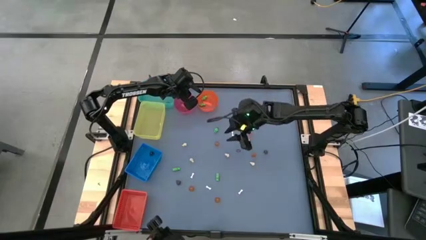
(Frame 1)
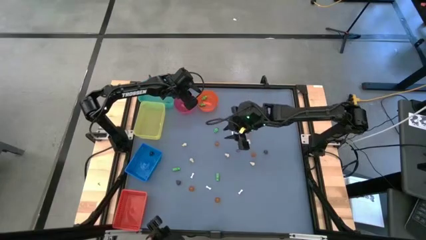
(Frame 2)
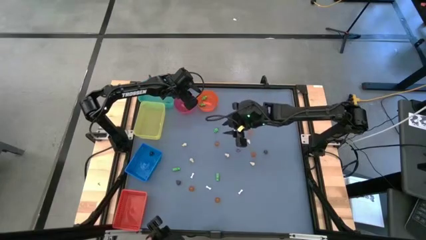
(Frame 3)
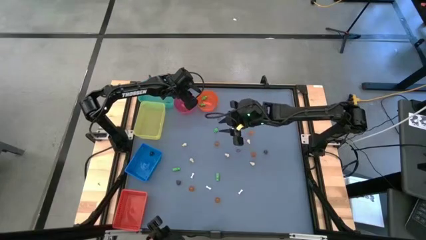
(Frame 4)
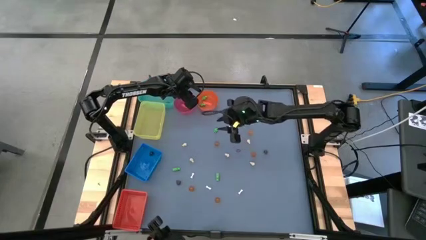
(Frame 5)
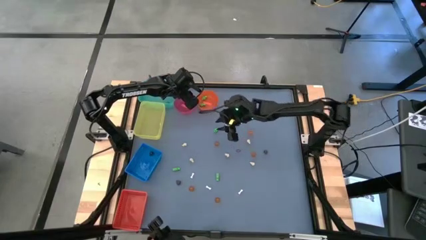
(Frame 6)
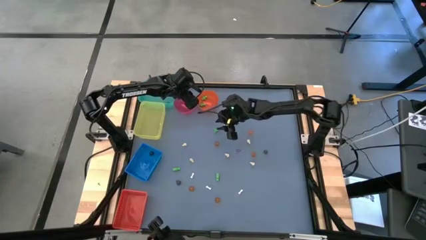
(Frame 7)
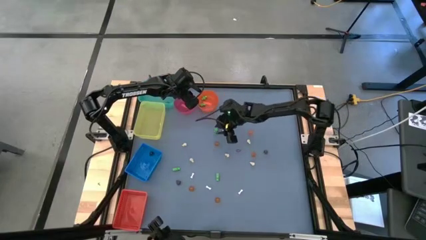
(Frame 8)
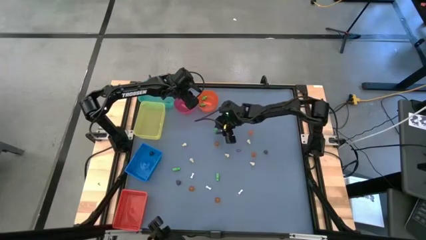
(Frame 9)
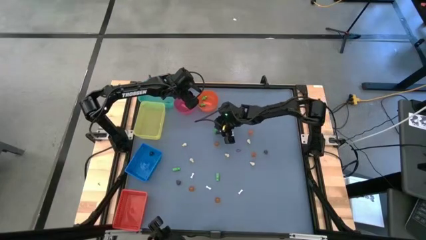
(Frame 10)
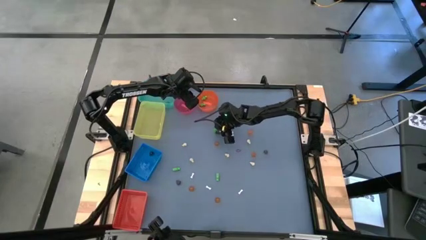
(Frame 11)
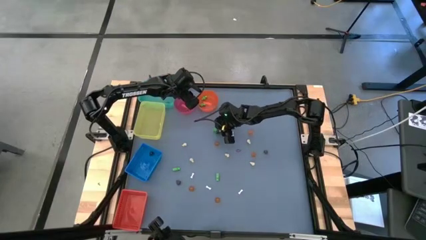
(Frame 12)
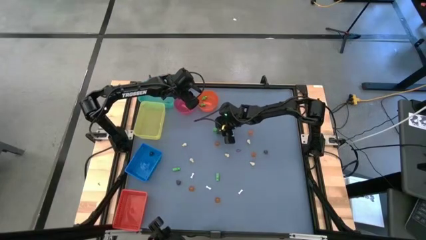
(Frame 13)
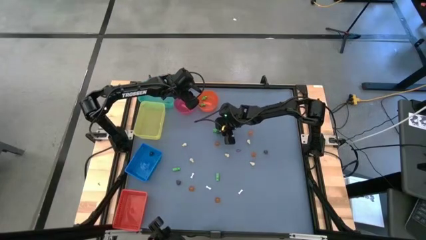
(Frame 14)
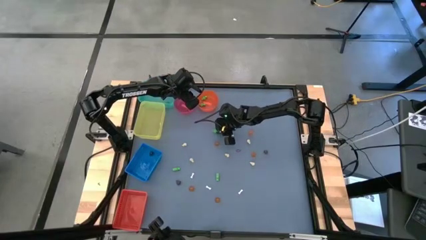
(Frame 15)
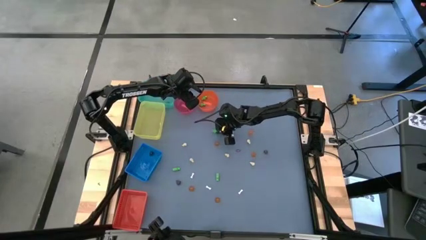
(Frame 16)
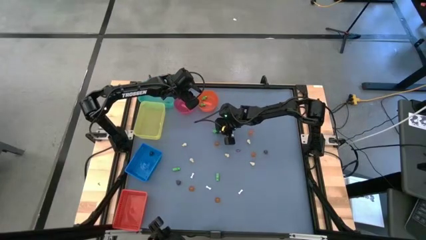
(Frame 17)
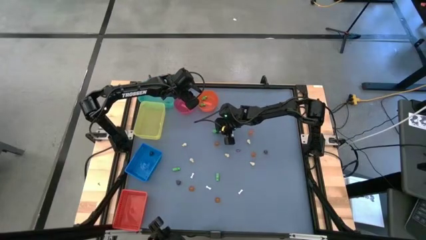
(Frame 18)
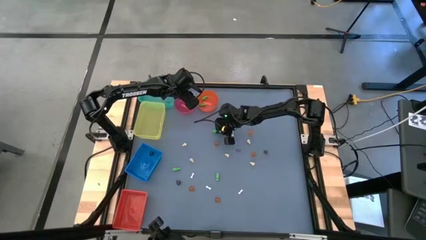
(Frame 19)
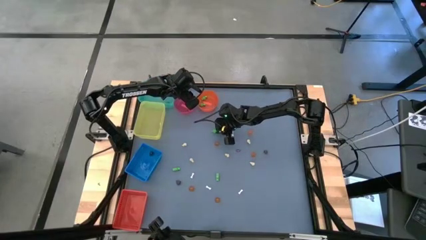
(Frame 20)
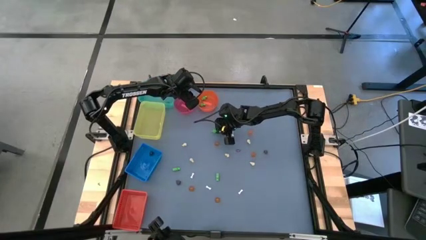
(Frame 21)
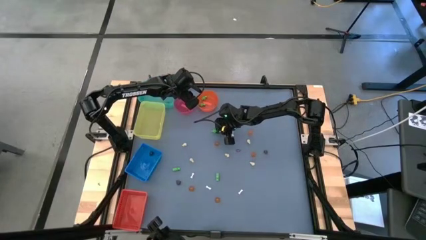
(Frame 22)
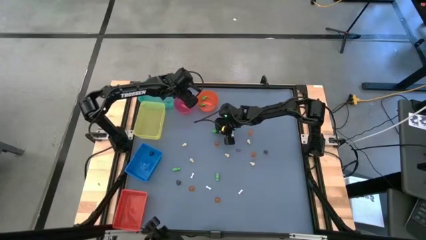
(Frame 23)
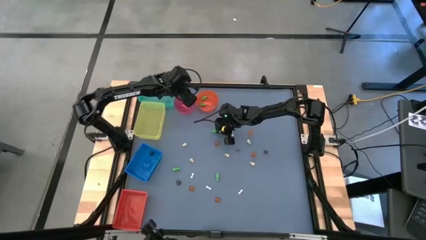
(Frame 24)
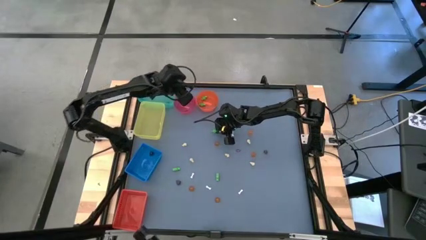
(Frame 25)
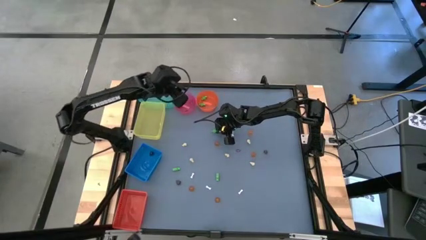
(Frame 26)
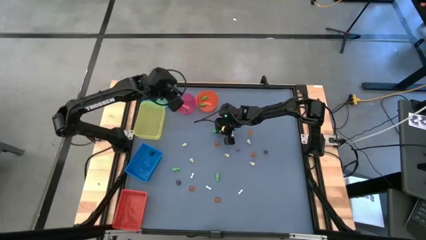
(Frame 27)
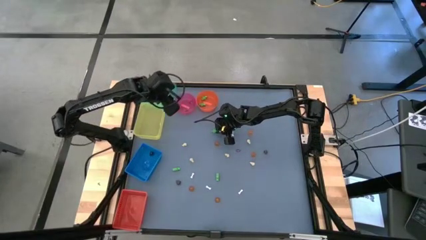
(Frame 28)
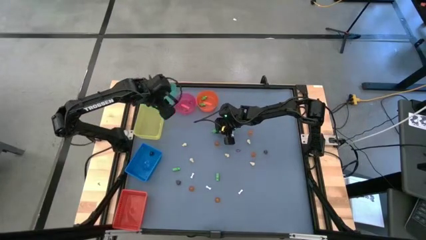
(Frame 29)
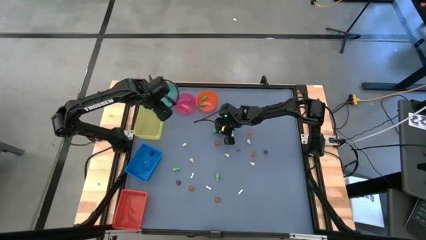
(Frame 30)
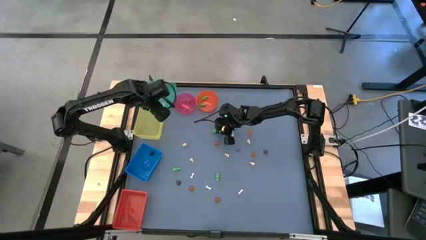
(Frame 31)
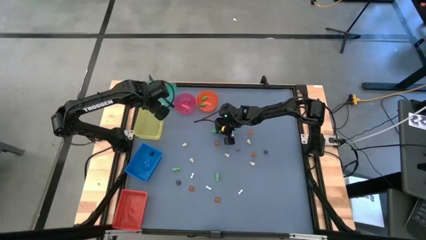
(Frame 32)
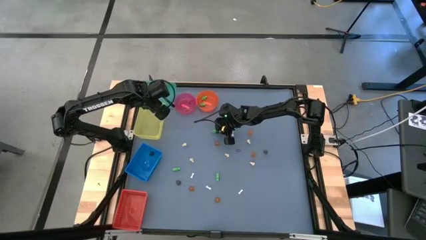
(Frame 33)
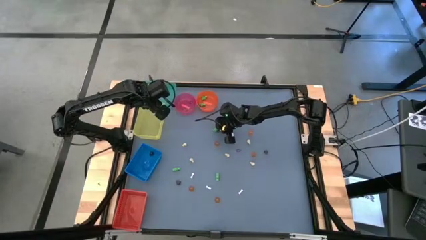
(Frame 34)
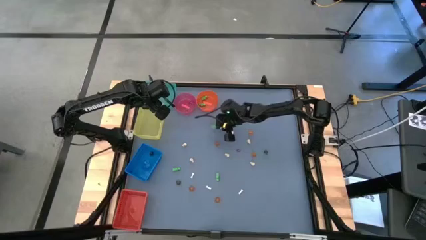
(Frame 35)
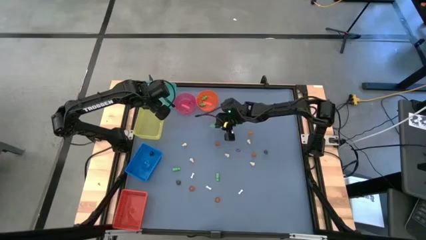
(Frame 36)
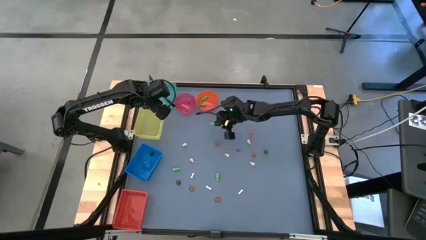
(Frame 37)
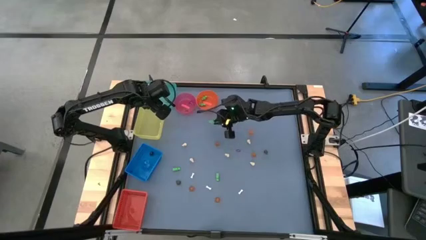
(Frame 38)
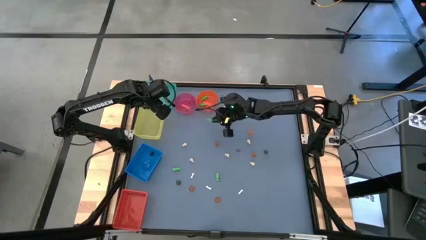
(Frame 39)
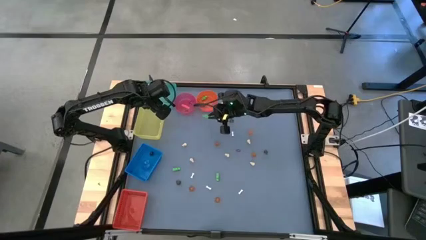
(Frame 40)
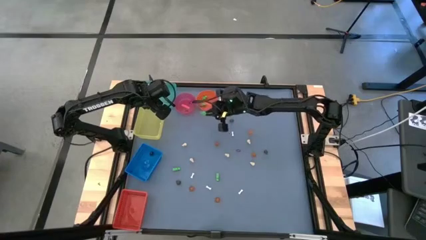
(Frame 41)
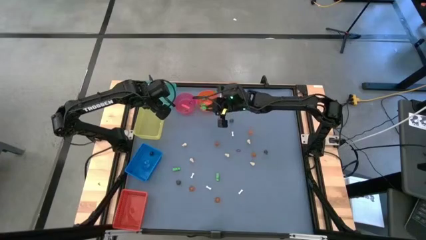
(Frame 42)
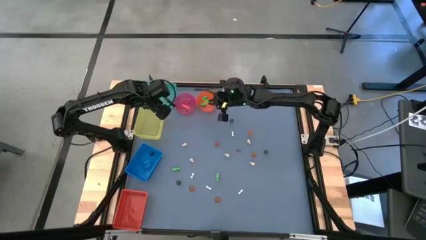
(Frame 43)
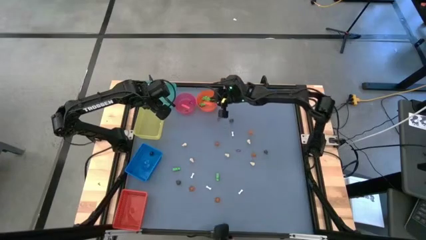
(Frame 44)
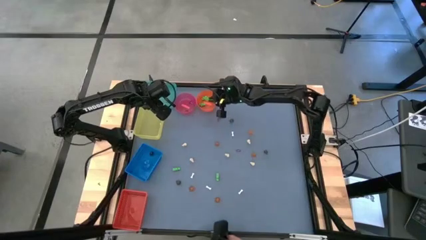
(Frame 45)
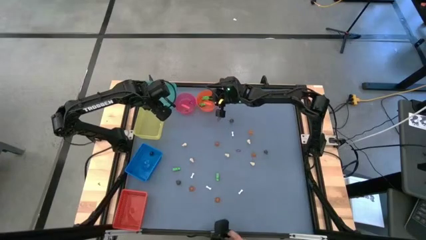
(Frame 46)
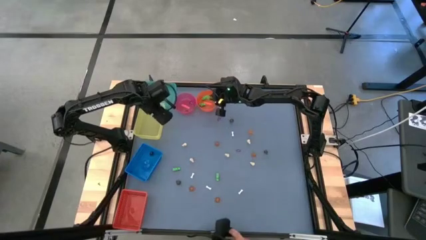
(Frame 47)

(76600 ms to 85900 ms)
Task: Sort Halloween decoration
Put the green skeleton toy into the orange bin

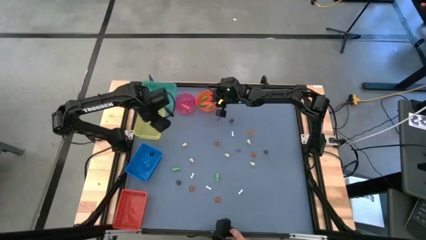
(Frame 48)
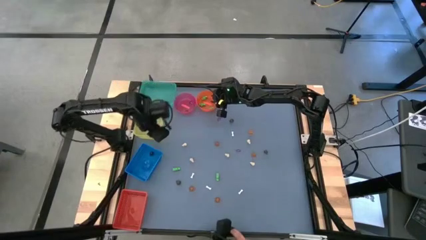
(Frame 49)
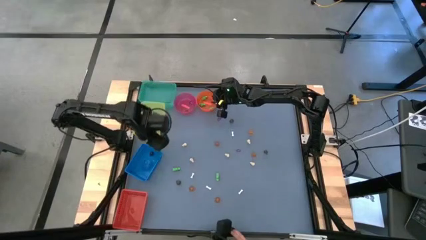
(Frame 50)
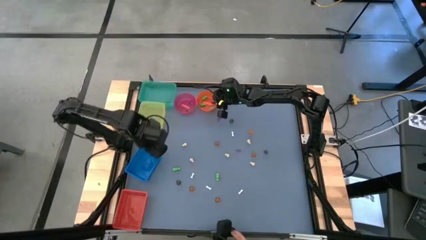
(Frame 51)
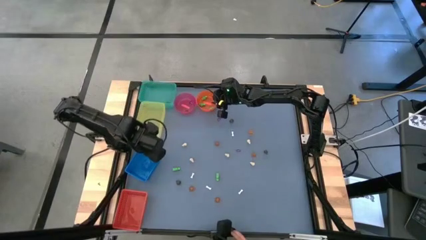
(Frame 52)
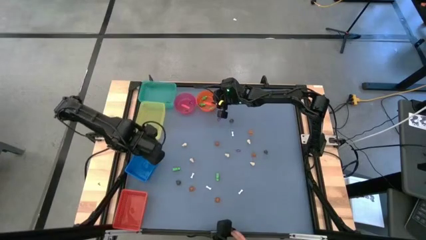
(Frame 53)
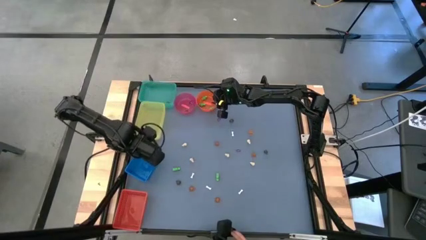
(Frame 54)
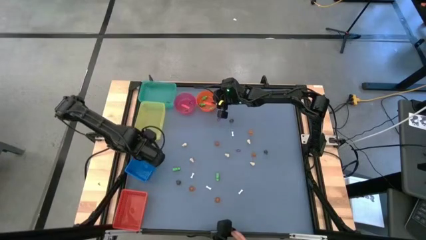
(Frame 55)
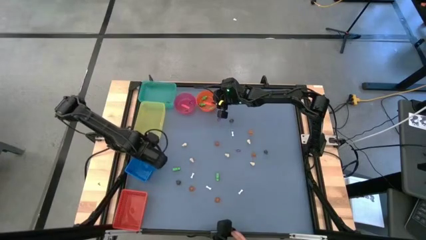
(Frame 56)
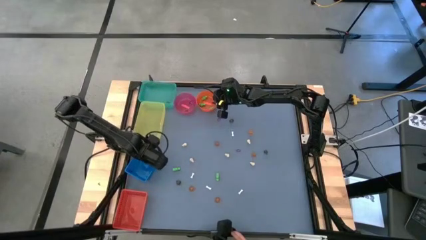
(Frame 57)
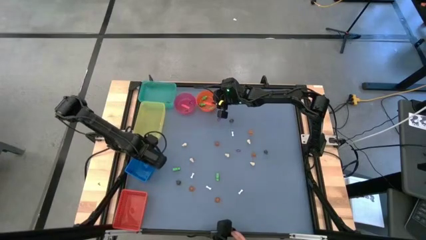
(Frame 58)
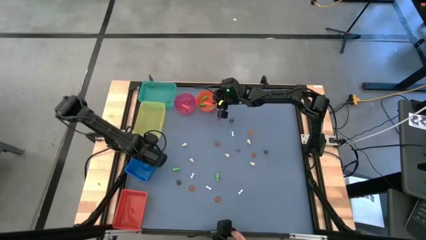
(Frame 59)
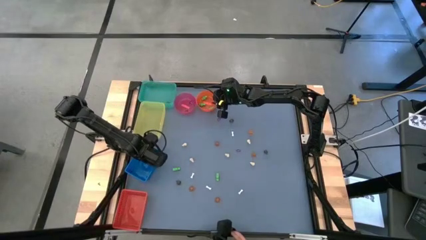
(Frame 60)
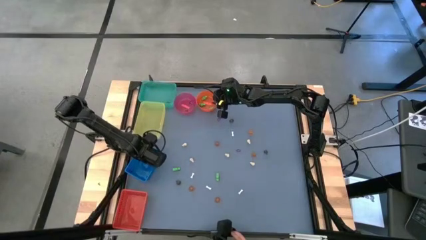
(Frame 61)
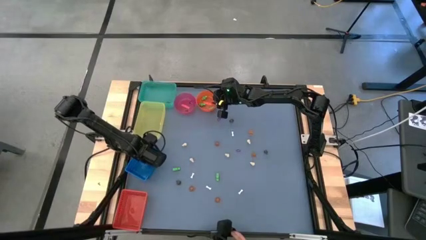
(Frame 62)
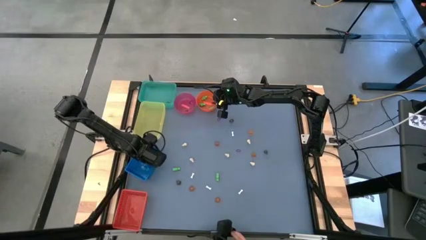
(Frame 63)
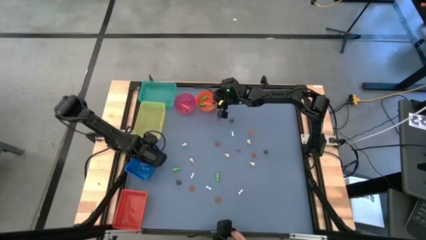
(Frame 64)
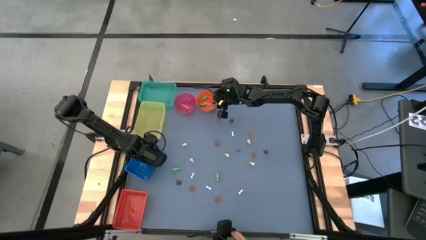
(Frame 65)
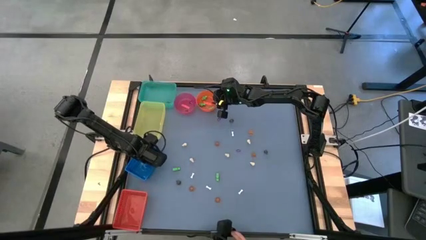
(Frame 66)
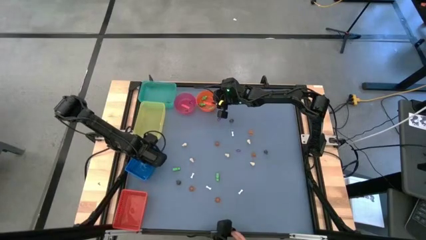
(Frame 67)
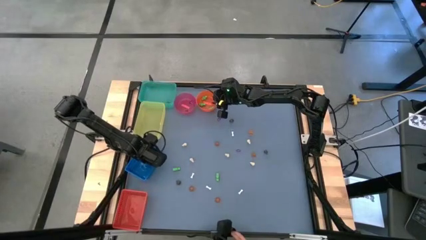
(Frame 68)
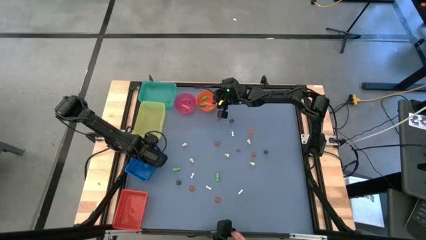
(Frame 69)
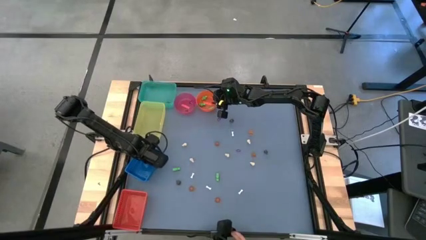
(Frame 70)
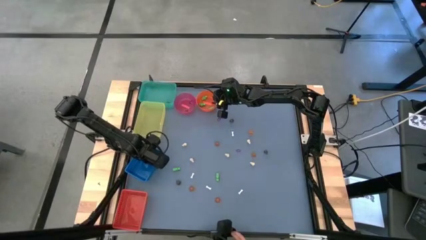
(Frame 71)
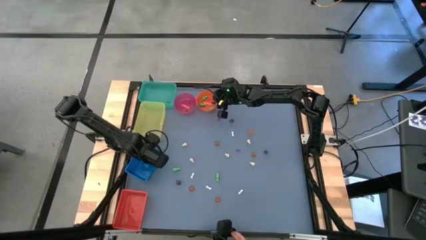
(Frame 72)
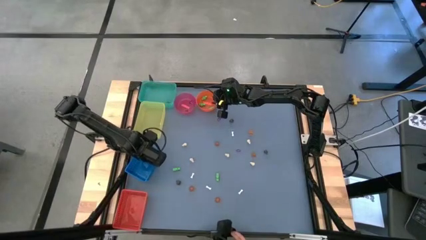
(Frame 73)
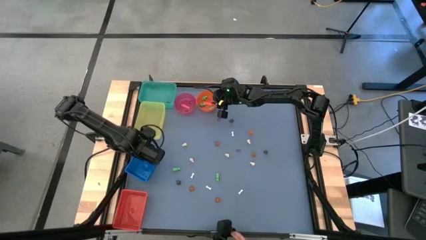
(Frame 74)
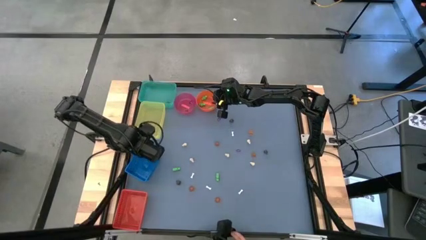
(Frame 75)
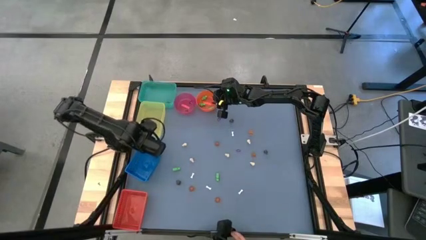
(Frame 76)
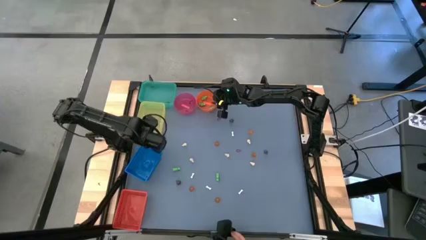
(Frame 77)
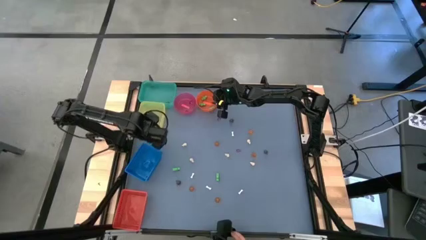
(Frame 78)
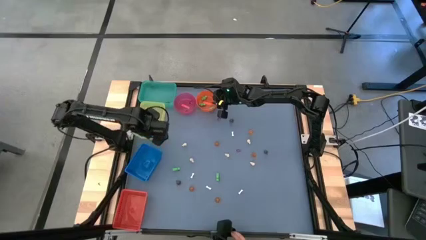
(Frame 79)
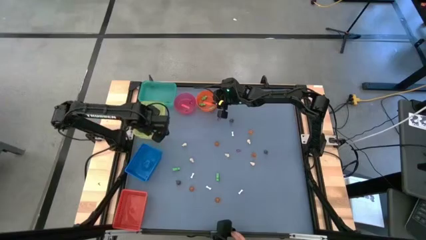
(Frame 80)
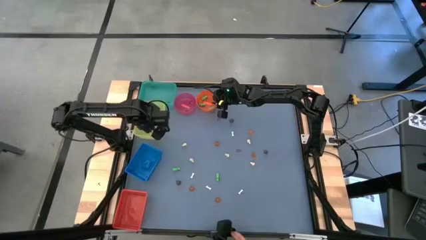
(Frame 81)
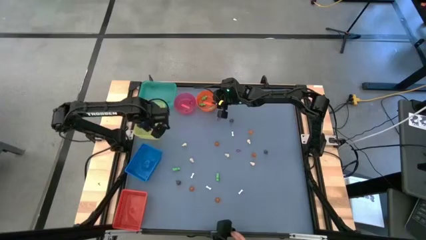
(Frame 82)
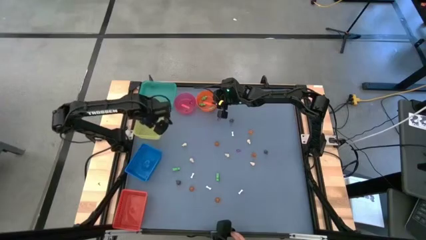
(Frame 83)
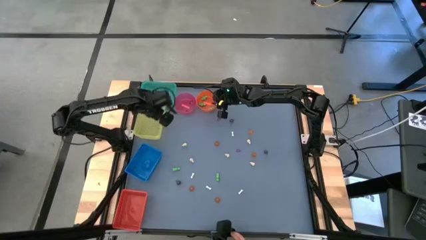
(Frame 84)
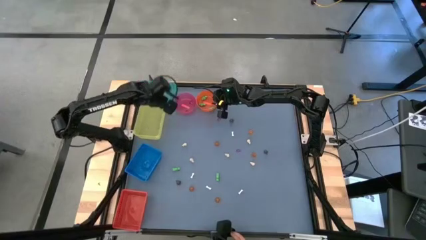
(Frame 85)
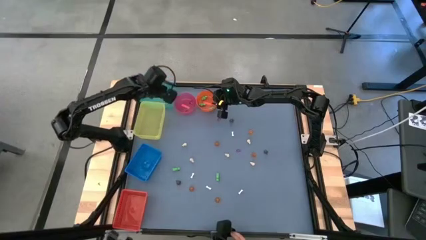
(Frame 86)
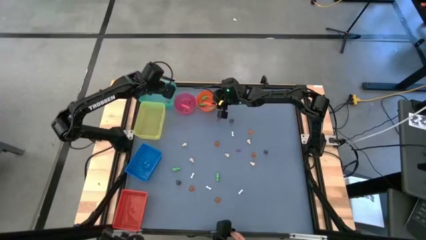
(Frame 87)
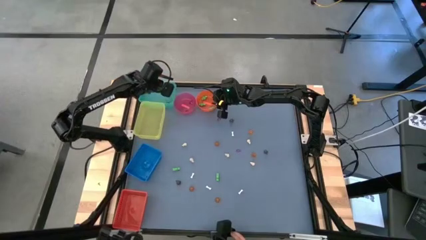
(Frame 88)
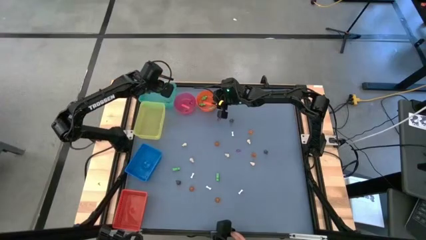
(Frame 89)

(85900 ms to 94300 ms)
Put the black skull toy into the green bin
